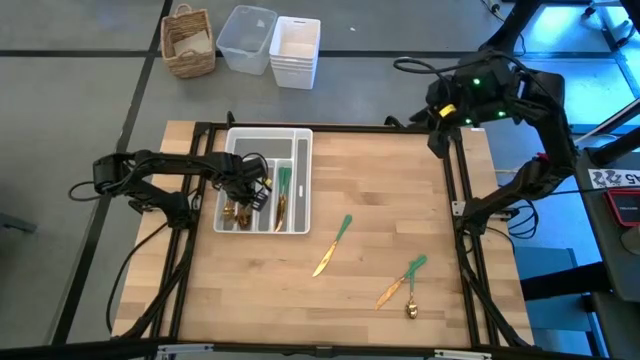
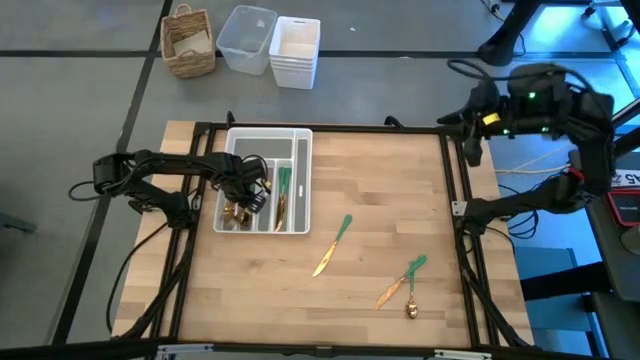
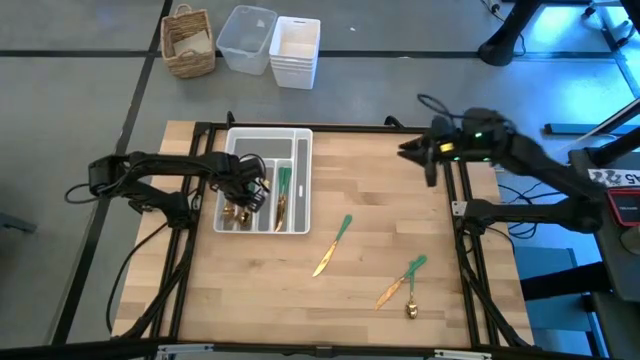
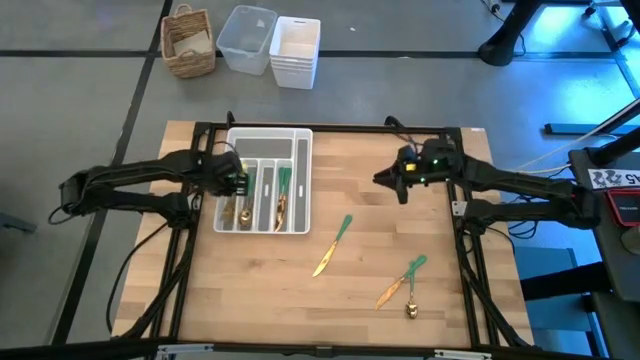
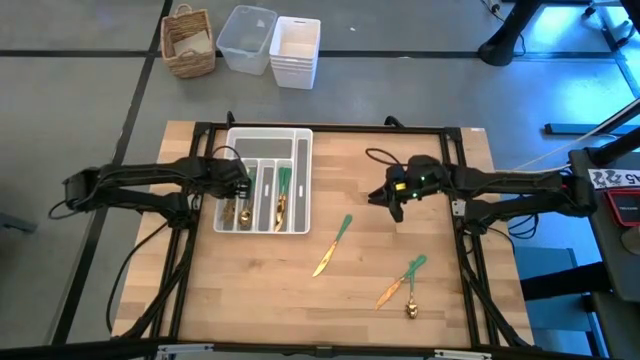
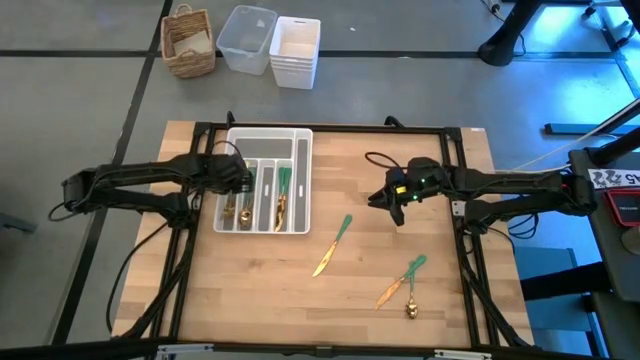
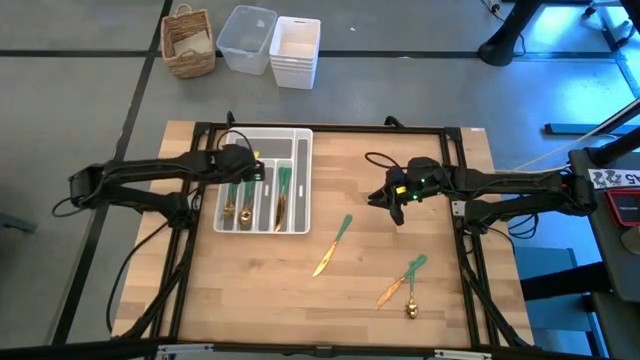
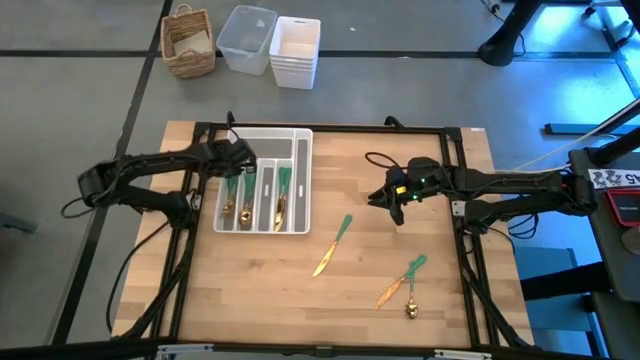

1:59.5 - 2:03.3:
Task: Sort silverware
Put the green fork into the white silverware tray

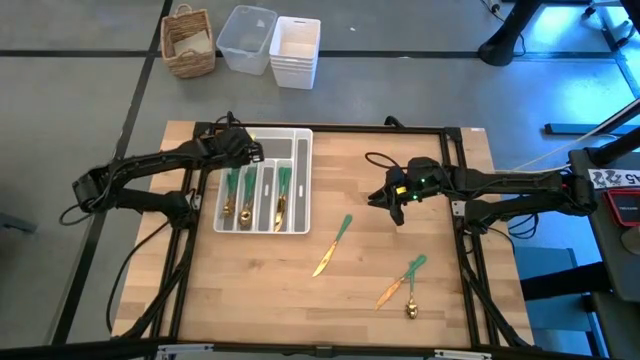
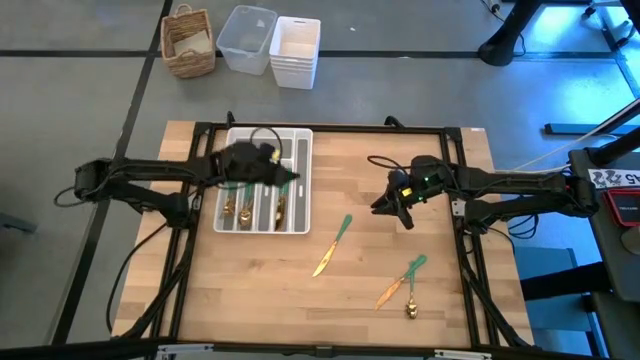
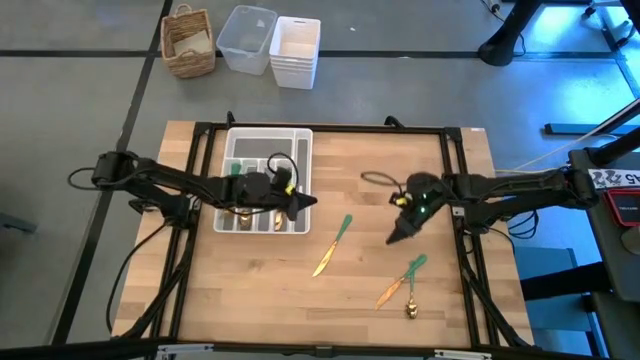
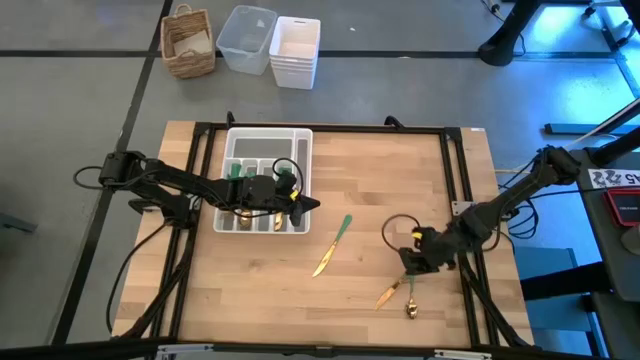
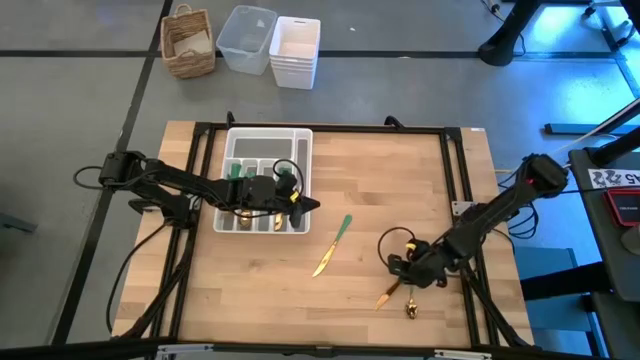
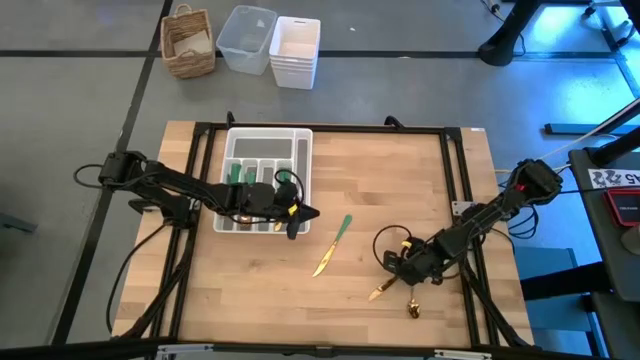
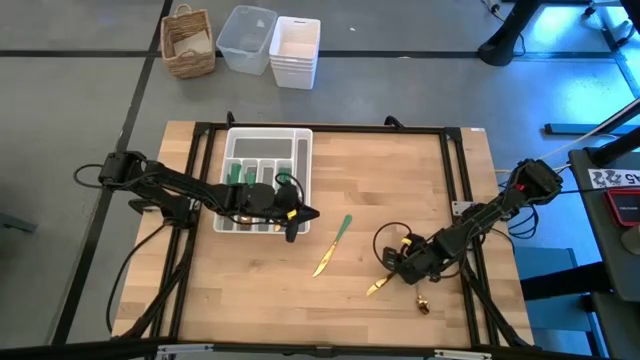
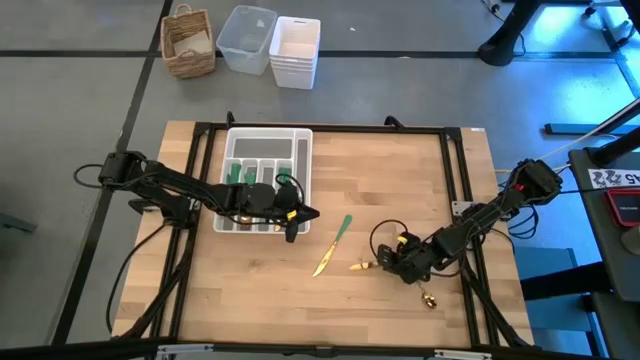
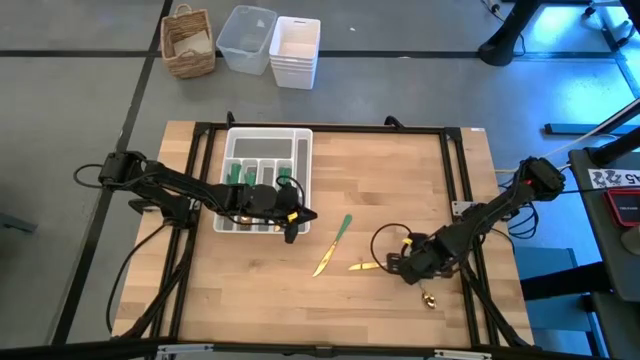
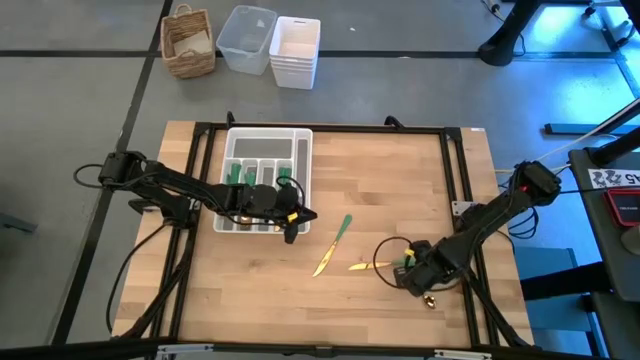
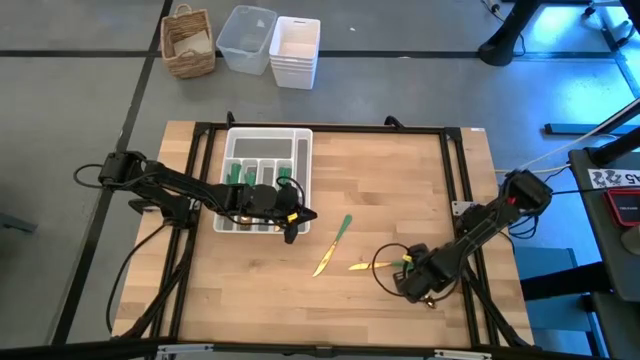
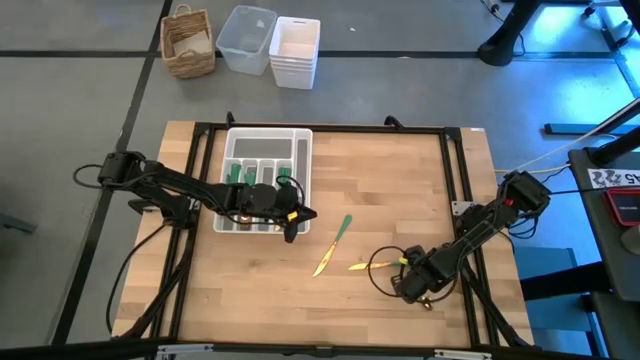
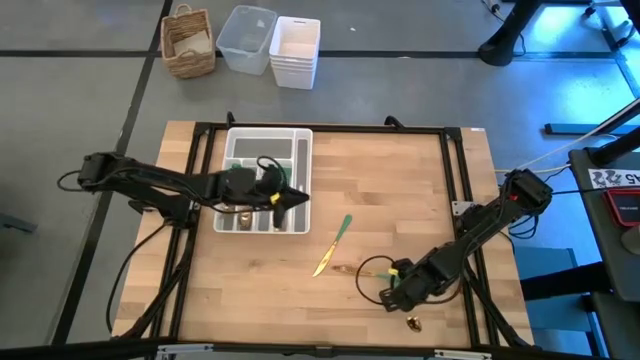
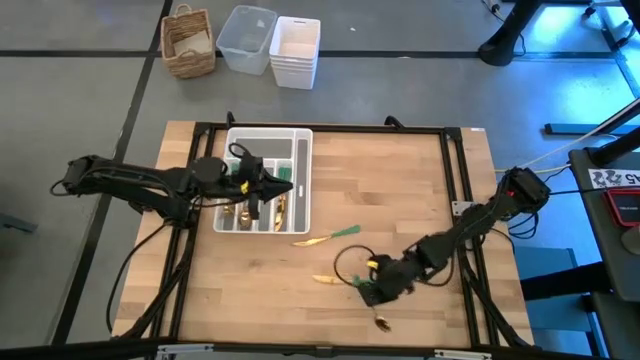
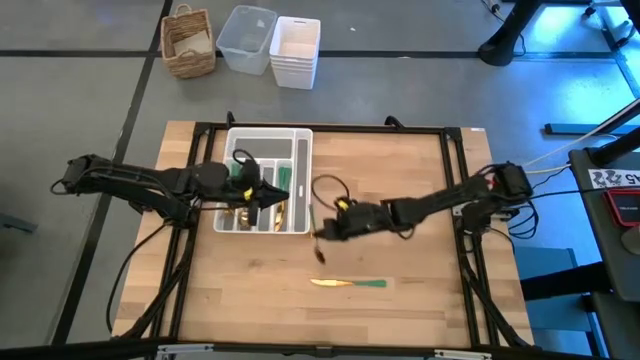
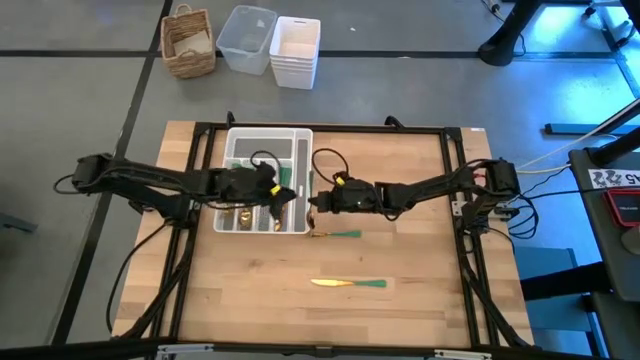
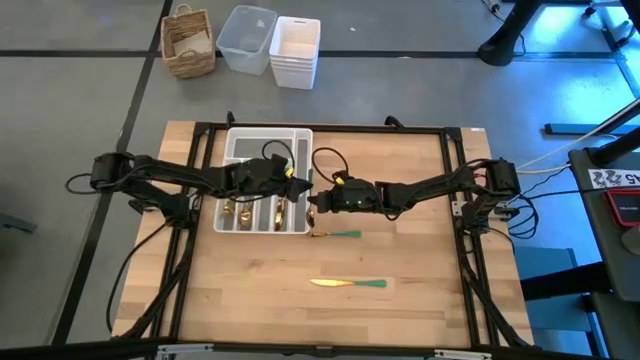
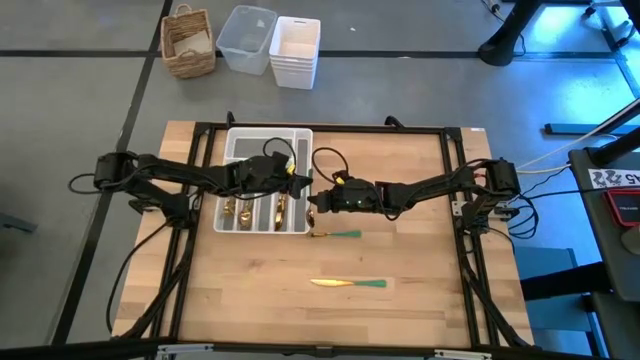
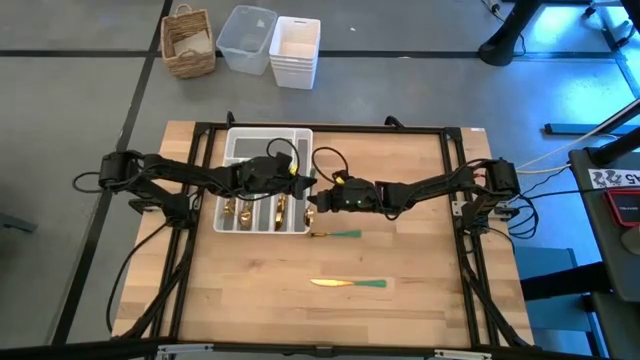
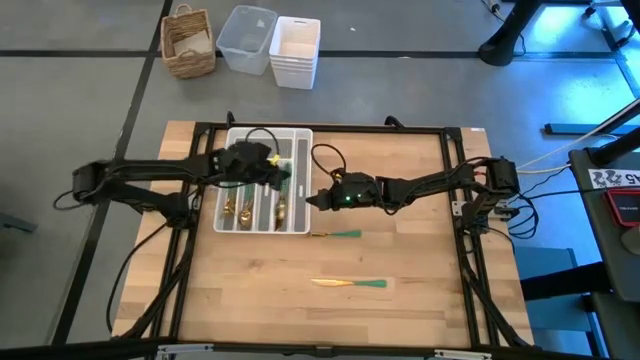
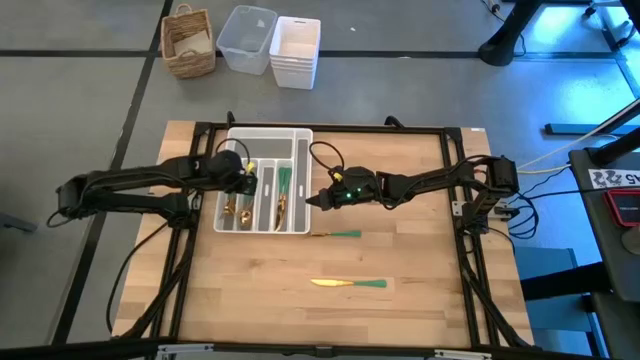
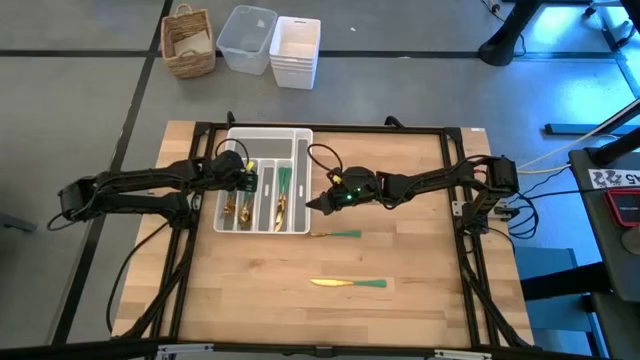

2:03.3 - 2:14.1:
Put the green spoon into the white silverware tray

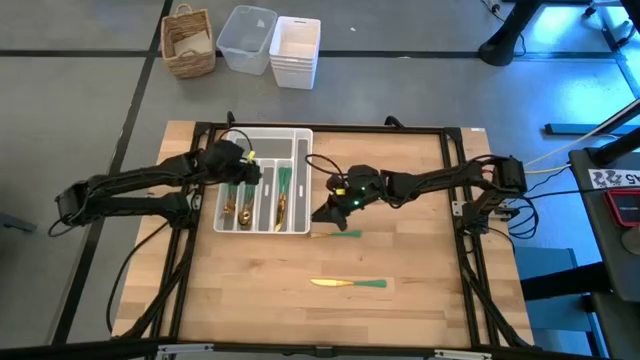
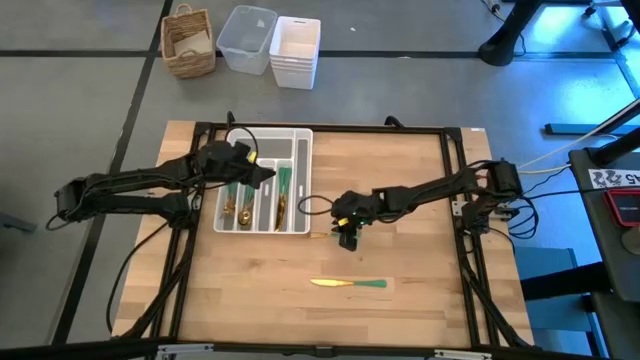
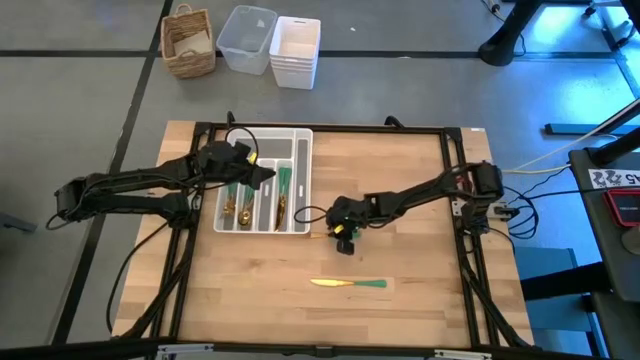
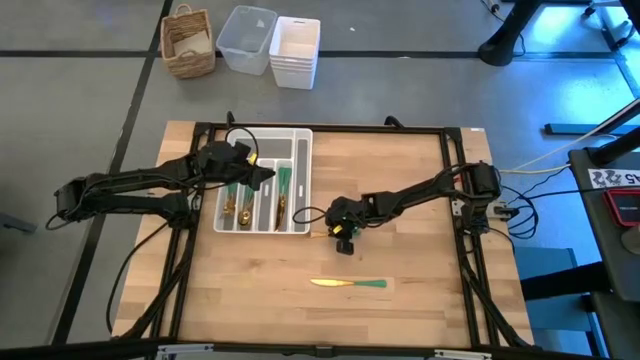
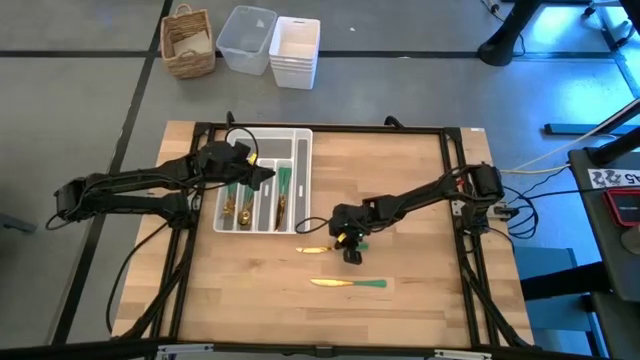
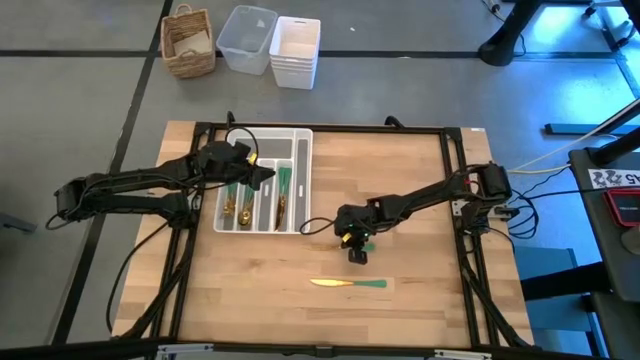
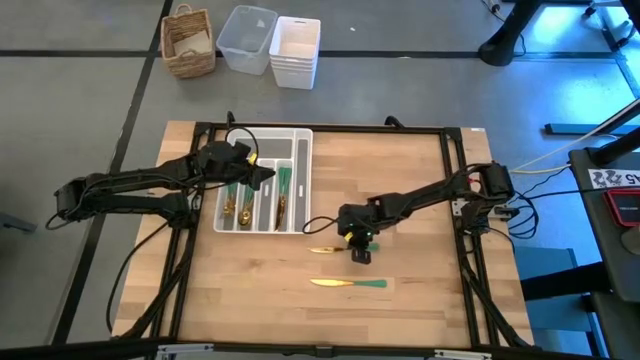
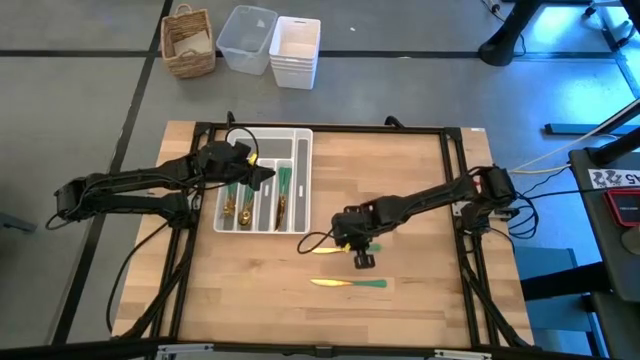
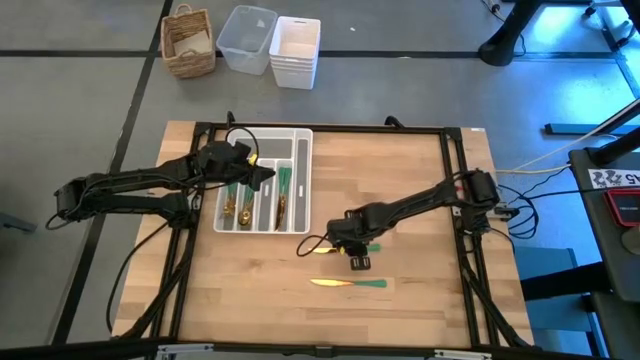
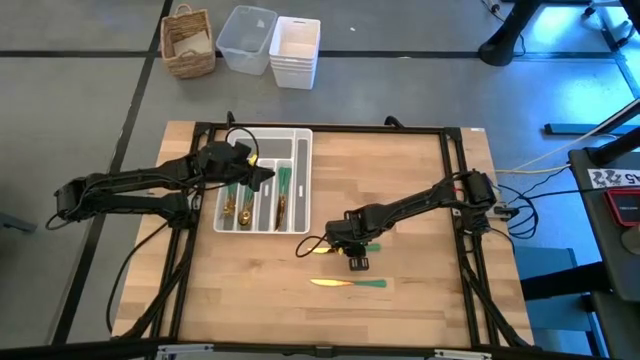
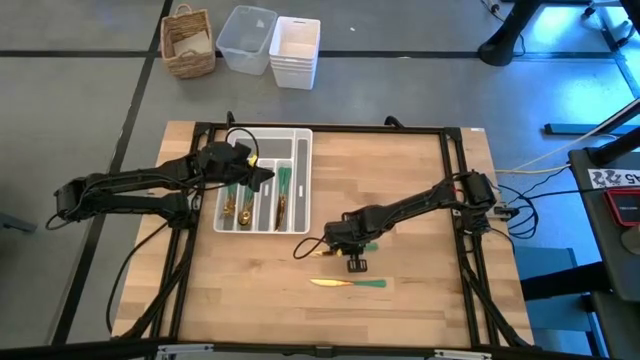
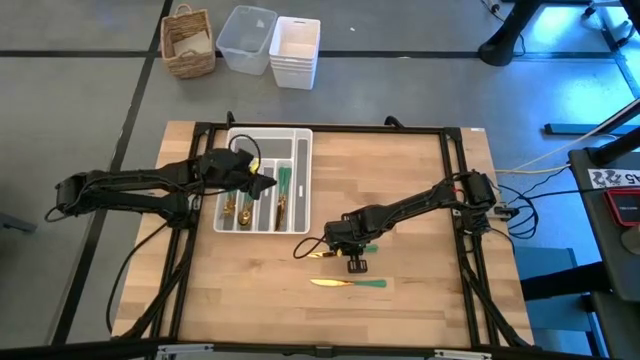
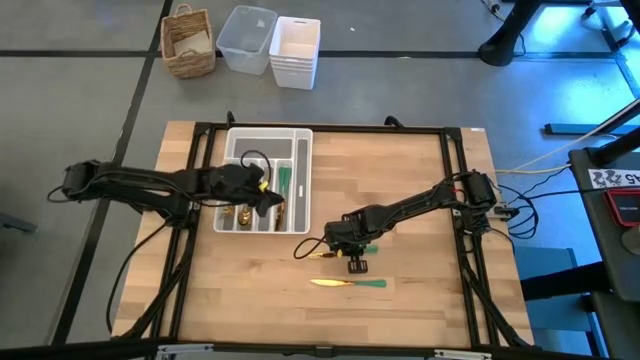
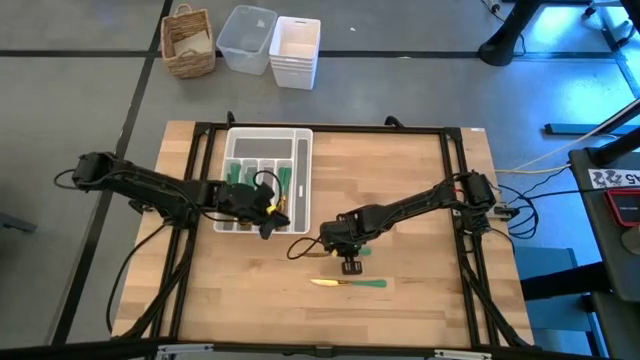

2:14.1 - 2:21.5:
Put the green knife into the white silverware tray
